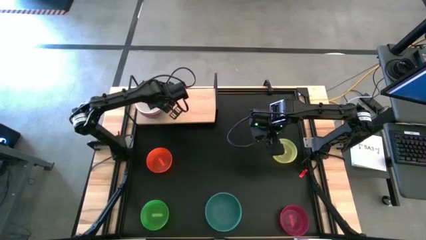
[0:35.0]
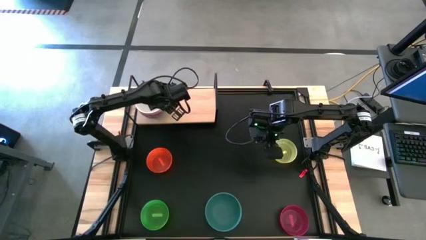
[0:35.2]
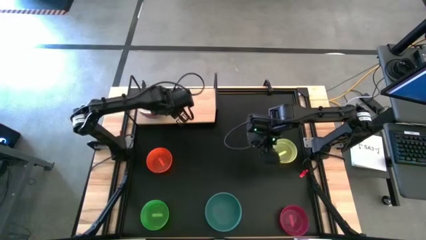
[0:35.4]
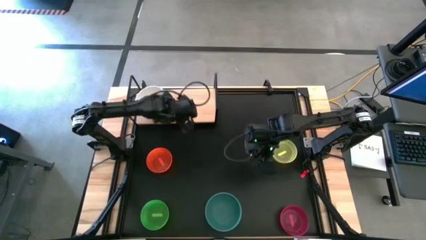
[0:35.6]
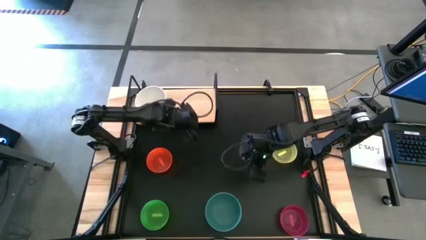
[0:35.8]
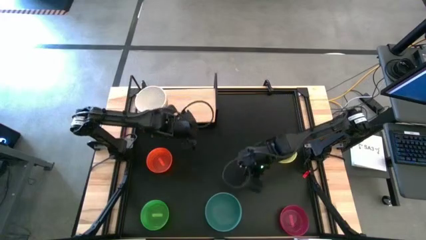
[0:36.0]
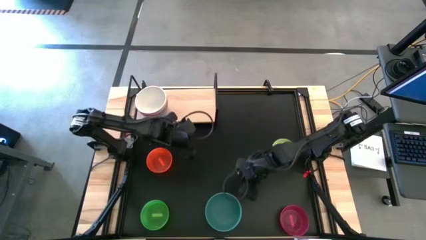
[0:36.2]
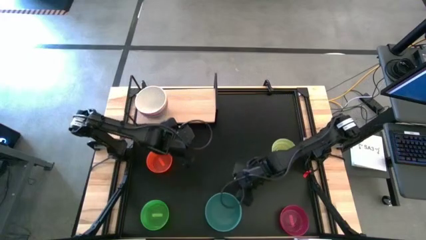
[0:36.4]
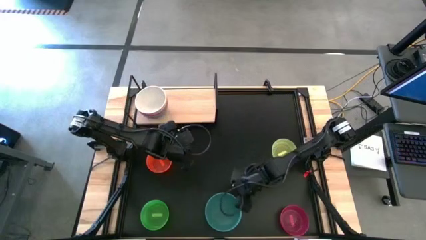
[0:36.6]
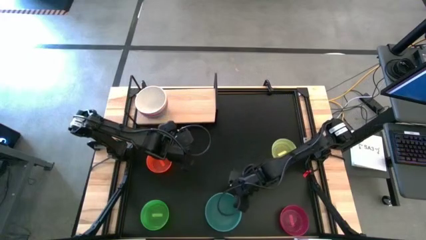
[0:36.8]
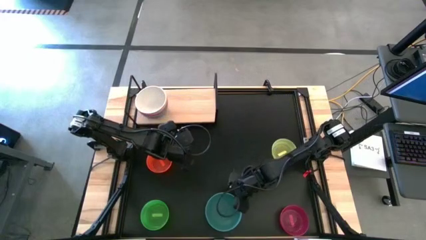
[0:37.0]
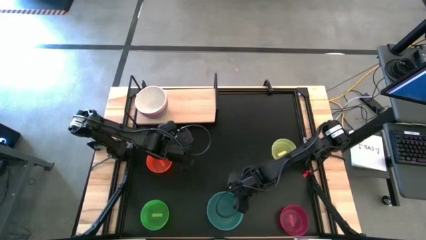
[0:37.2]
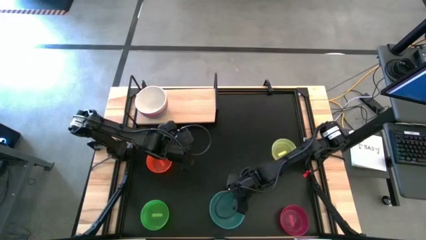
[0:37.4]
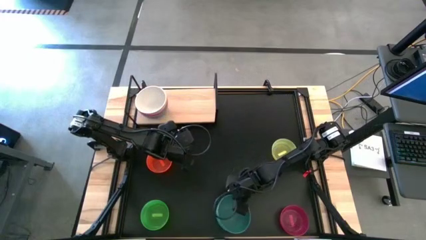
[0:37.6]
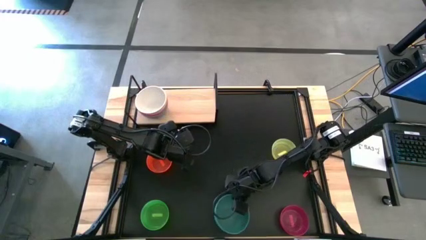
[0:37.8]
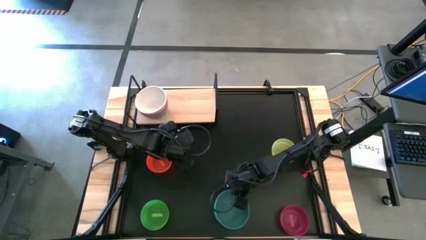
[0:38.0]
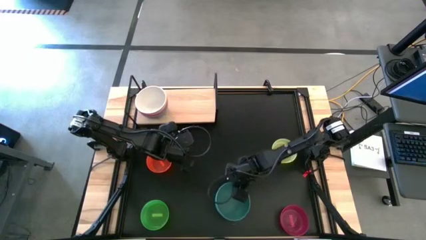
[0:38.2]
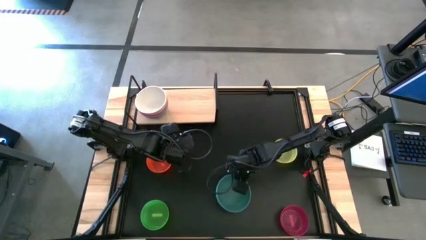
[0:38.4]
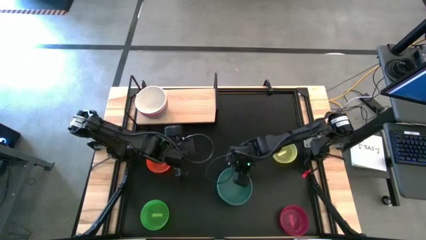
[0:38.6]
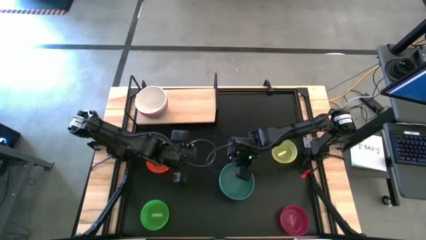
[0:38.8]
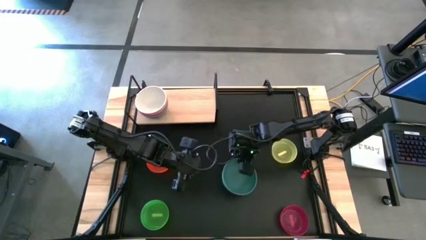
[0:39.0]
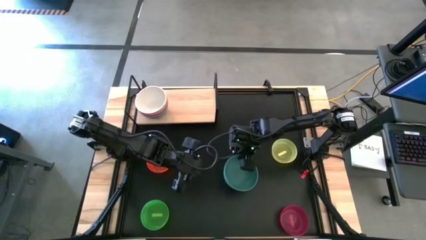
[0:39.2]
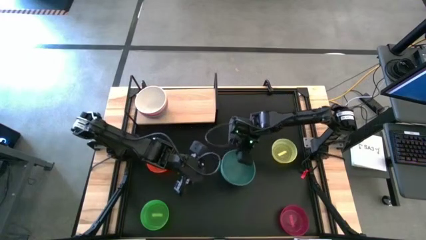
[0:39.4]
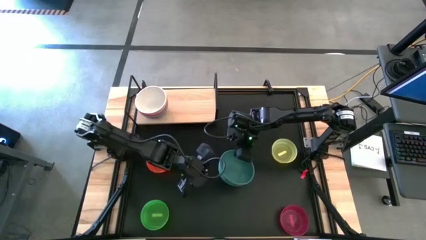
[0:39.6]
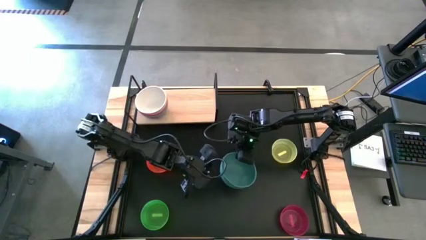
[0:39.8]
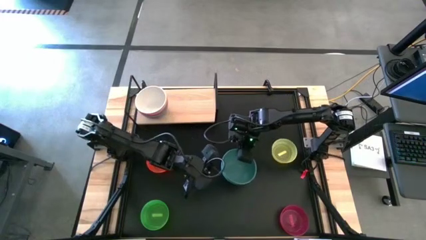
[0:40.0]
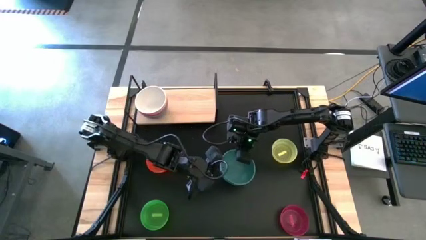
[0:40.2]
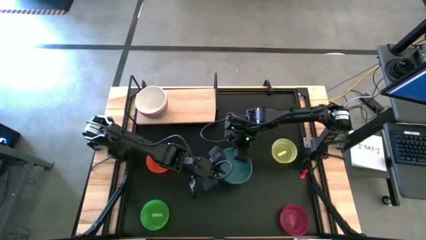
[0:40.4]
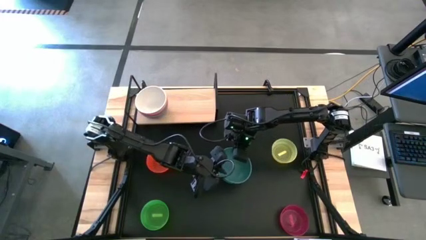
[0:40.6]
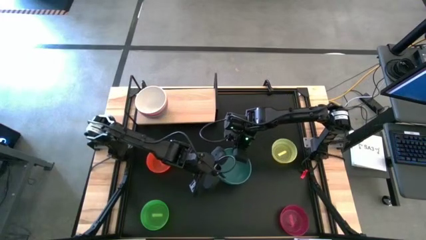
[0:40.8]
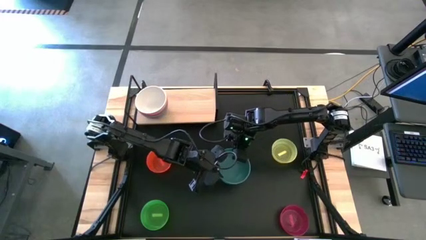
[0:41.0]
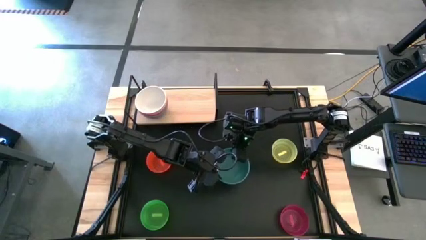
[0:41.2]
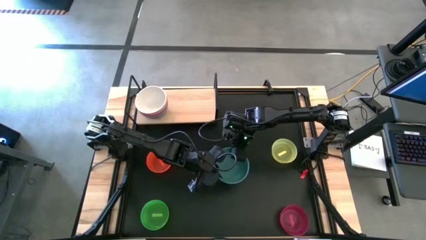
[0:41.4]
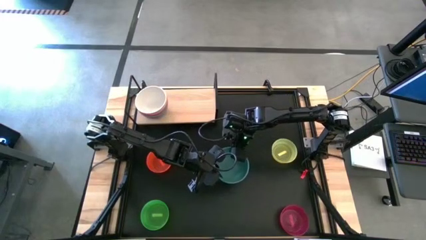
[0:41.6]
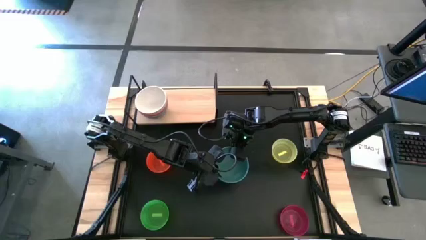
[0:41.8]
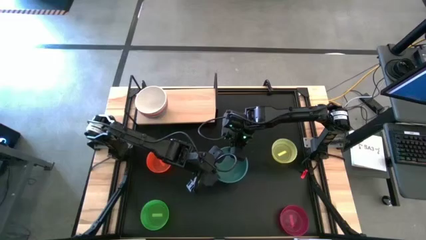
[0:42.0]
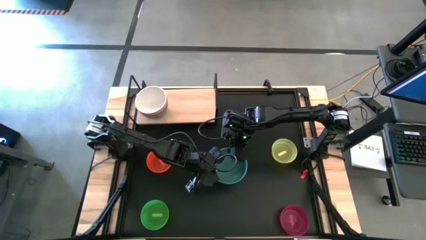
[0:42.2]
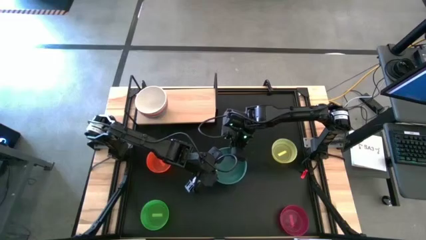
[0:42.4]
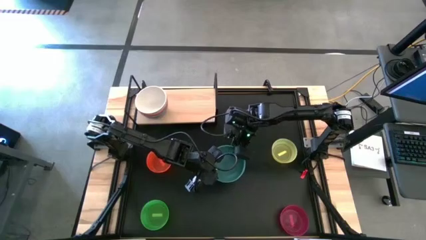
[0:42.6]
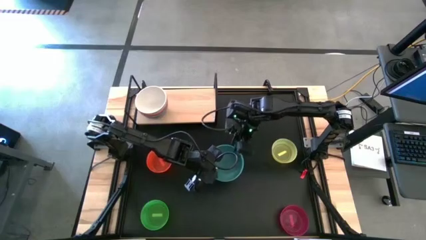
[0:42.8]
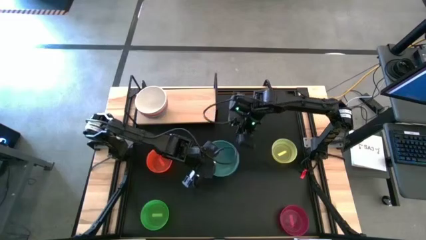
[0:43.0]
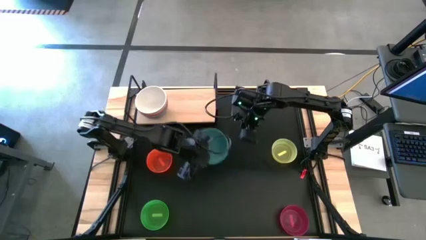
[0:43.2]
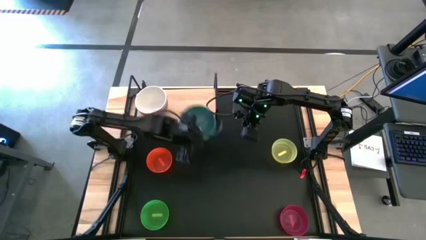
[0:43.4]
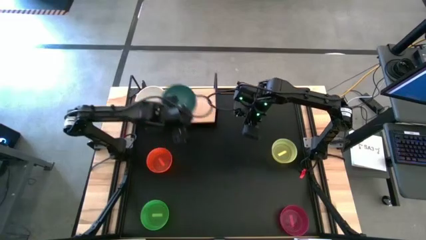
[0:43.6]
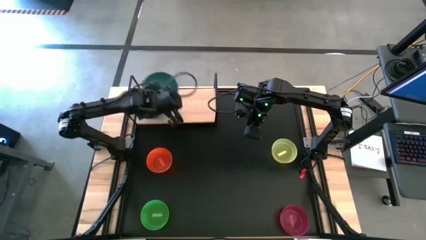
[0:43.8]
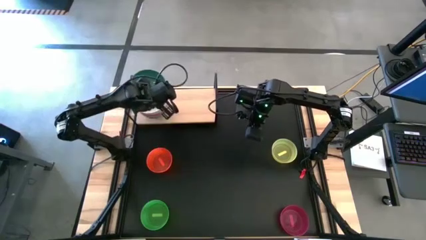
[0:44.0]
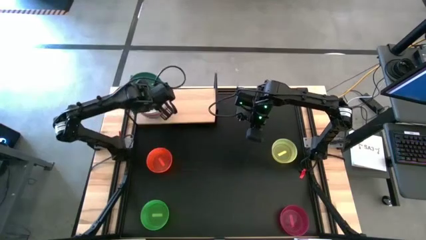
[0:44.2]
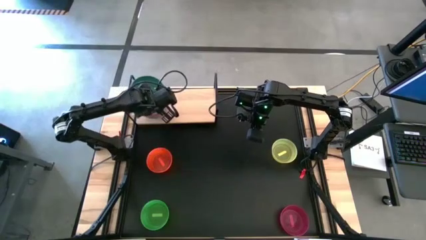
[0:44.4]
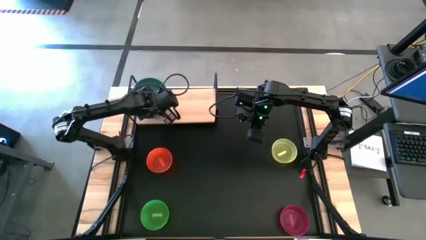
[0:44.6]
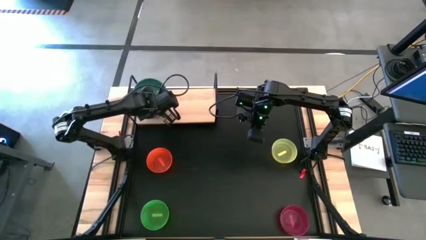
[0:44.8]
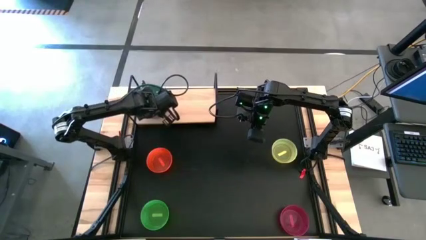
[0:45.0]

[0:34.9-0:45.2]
Task: Place and stack bowls onto a shelf
Stack the dark green bowl on the white bowl on the shelf

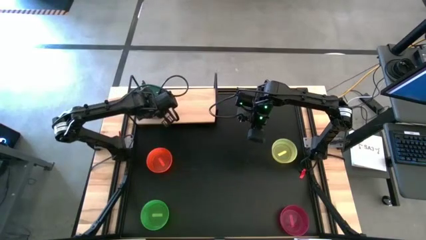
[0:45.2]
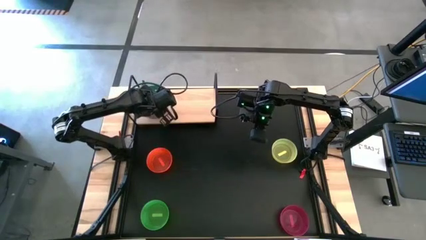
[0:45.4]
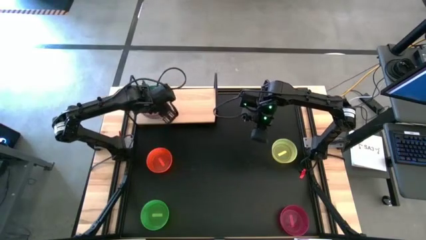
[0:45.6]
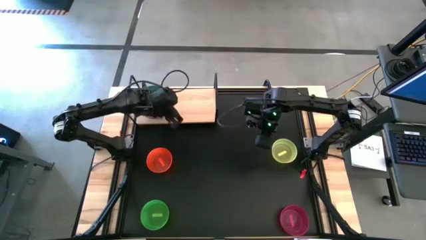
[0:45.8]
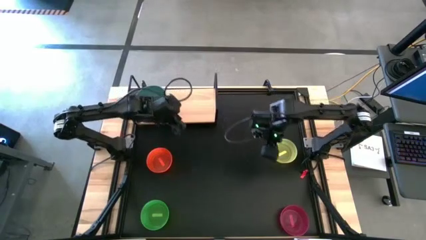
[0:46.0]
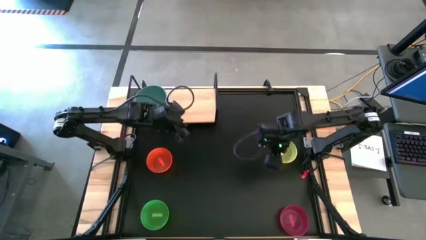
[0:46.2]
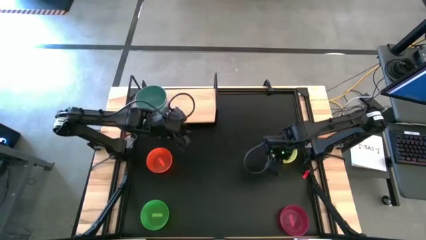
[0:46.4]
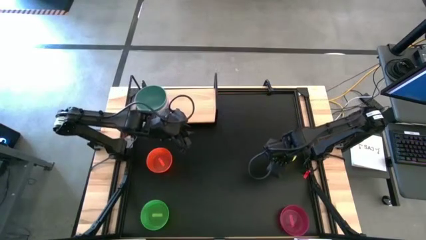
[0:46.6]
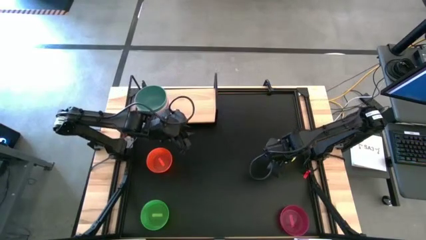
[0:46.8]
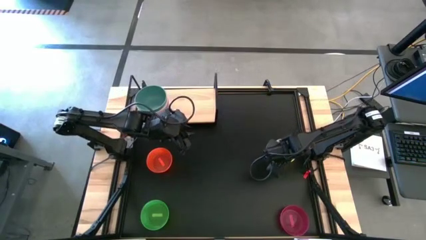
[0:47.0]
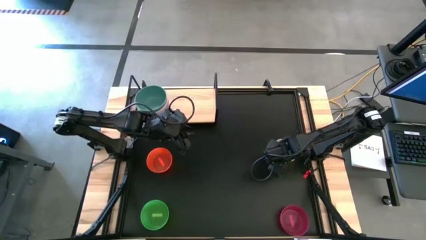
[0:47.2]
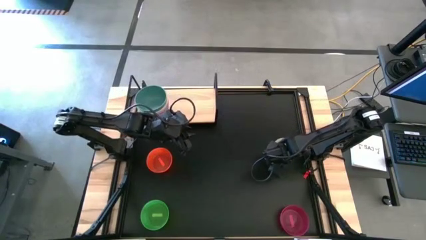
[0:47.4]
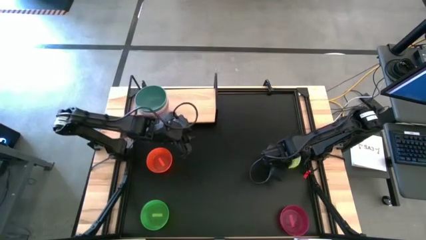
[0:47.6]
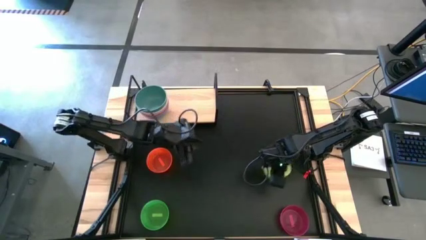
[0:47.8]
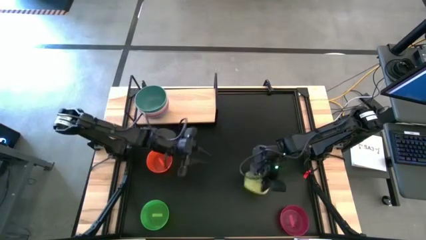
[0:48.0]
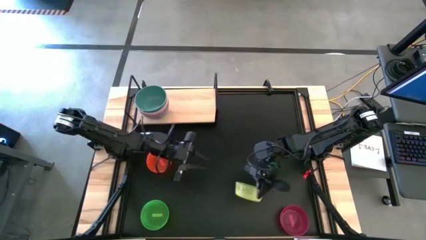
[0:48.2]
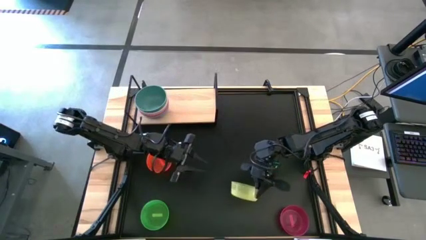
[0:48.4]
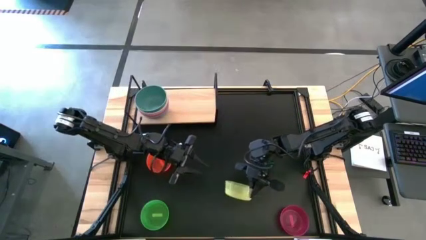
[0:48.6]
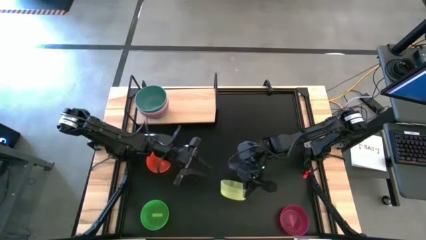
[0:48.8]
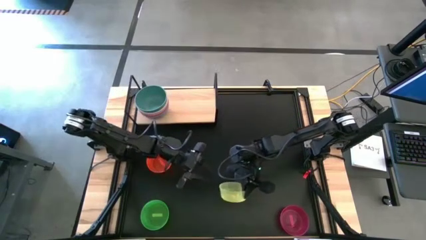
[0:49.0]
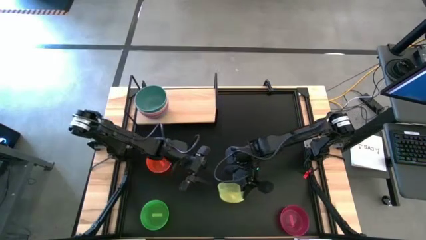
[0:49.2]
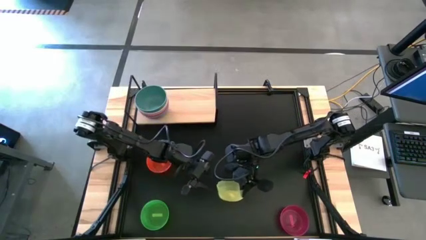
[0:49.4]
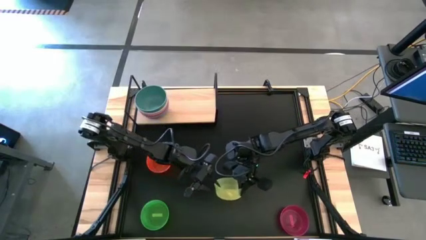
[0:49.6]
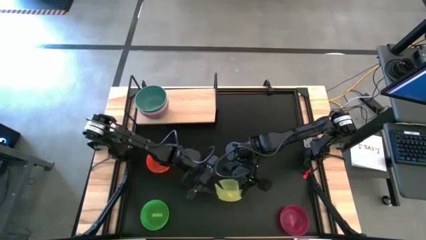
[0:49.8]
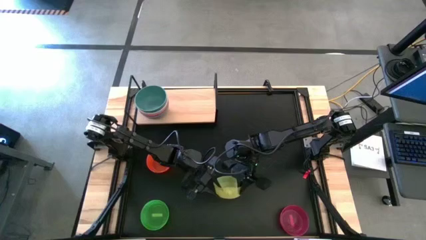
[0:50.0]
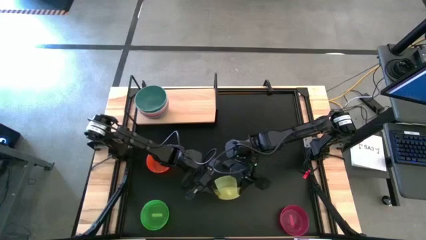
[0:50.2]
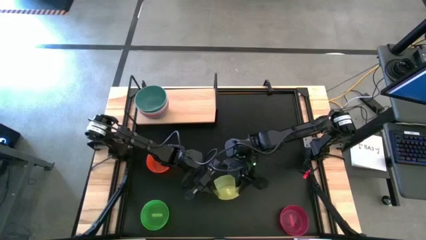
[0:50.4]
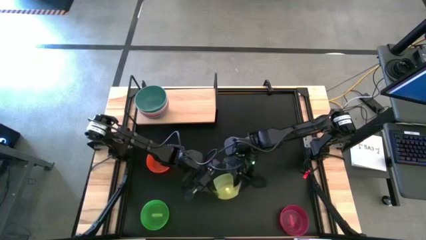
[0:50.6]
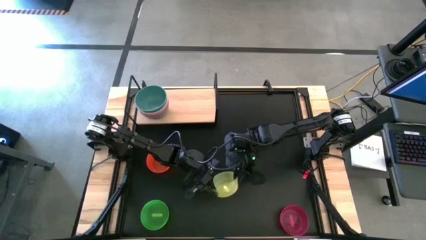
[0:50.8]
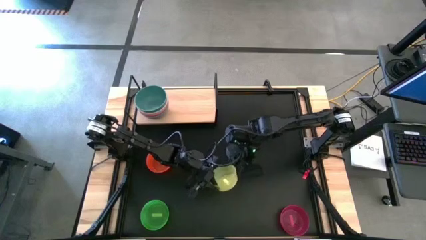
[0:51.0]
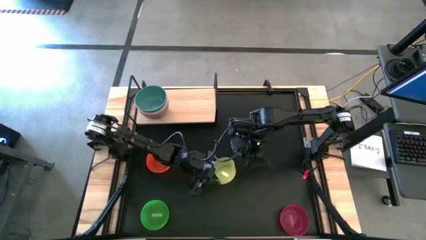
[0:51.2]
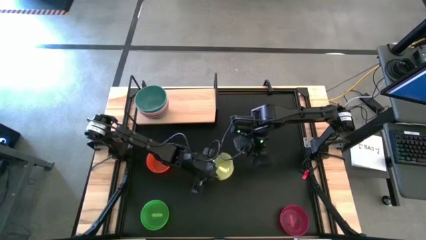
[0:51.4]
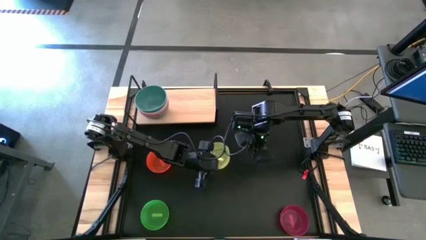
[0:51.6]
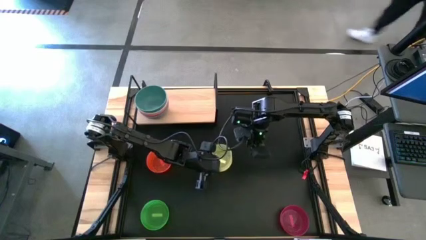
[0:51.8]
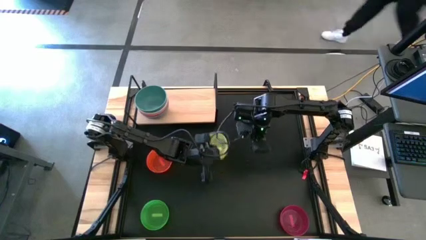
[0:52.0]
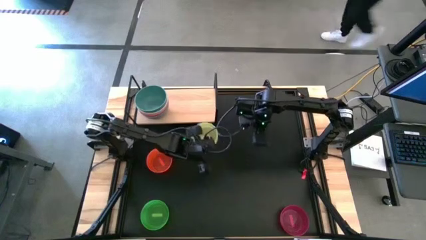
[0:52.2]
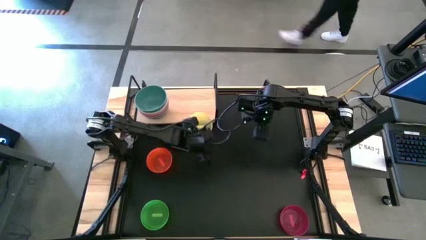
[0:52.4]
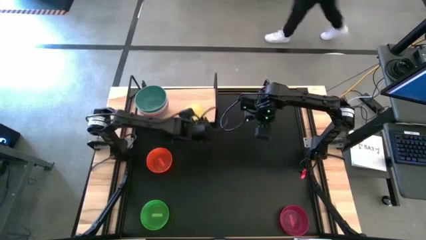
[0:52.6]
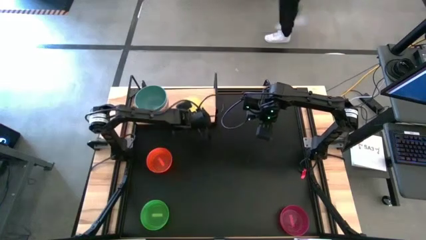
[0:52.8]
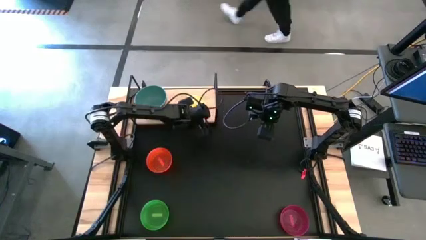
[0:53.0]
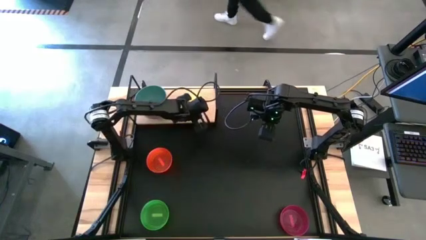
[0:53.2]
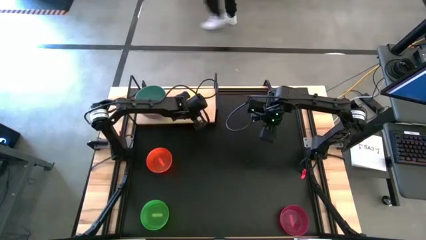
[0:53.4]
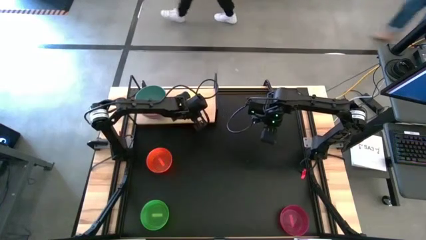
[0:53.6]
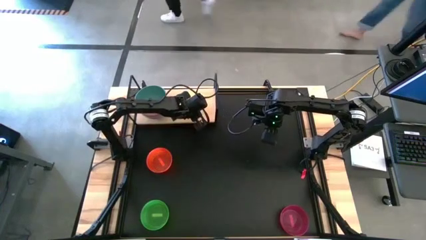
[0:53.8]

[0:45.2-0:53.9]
Put the yellow bowl on the shelf
